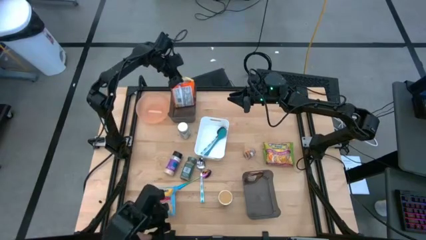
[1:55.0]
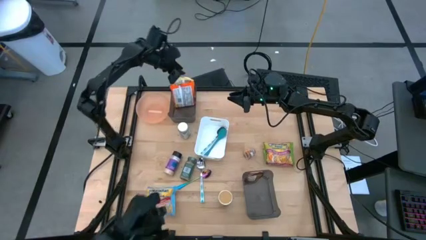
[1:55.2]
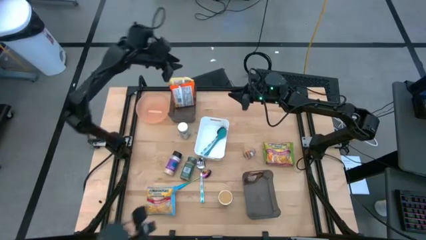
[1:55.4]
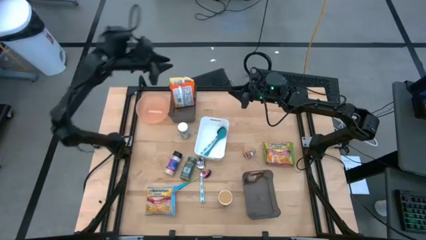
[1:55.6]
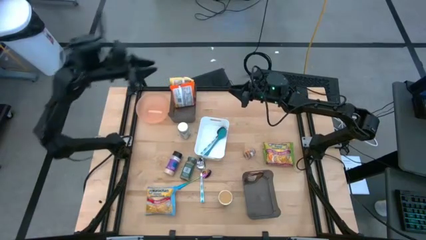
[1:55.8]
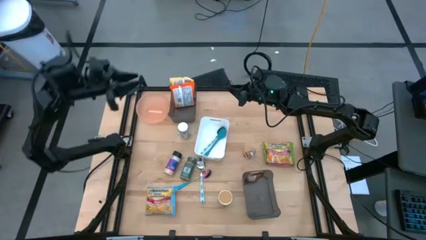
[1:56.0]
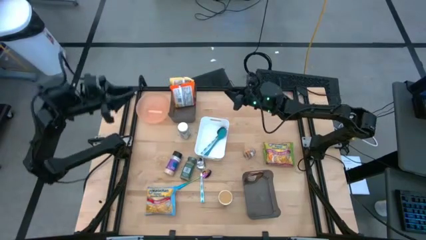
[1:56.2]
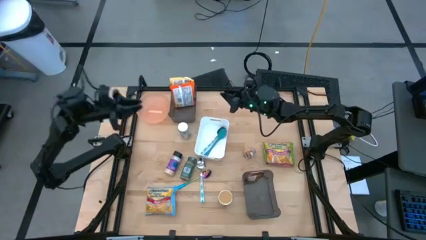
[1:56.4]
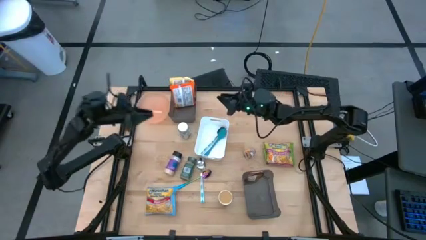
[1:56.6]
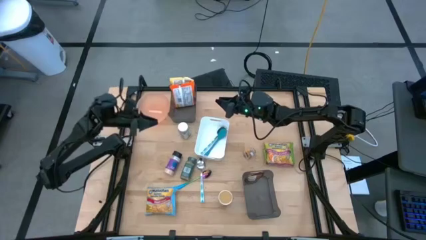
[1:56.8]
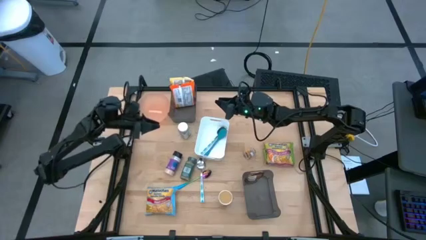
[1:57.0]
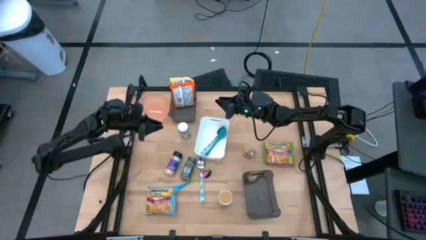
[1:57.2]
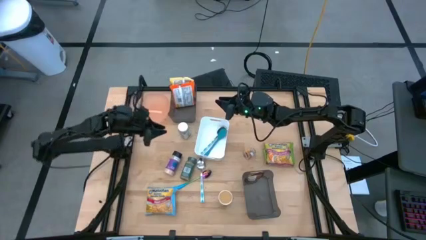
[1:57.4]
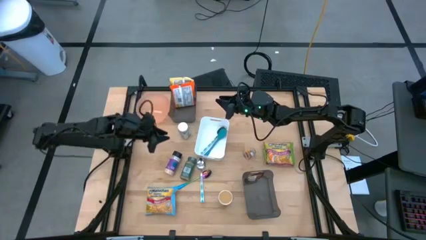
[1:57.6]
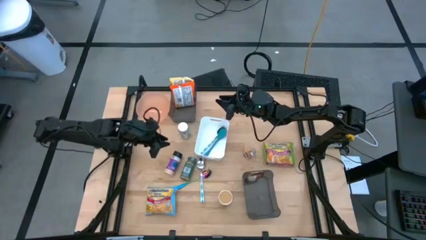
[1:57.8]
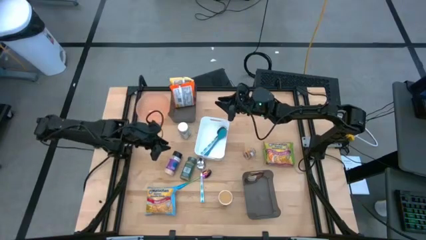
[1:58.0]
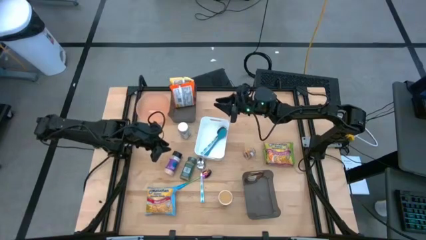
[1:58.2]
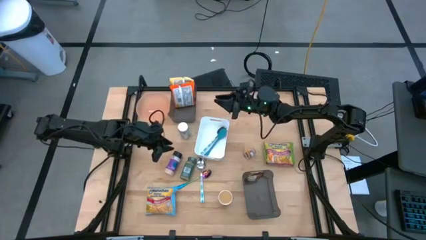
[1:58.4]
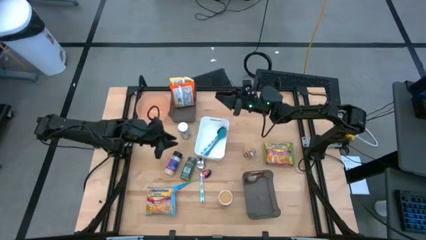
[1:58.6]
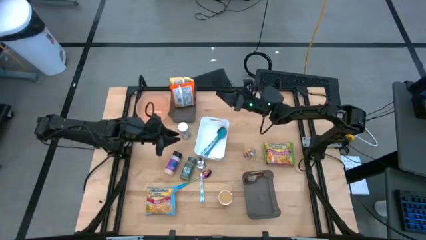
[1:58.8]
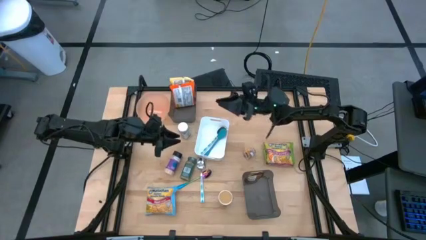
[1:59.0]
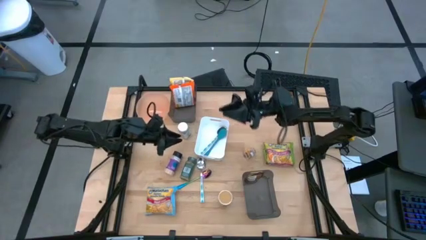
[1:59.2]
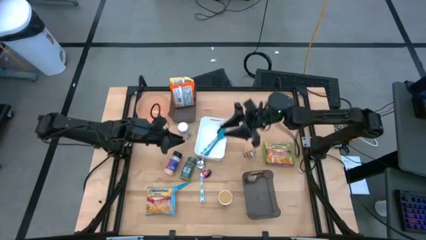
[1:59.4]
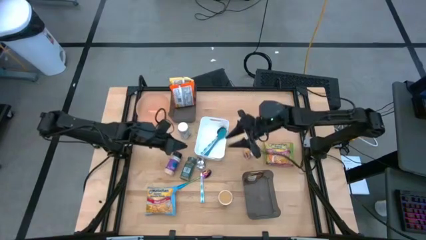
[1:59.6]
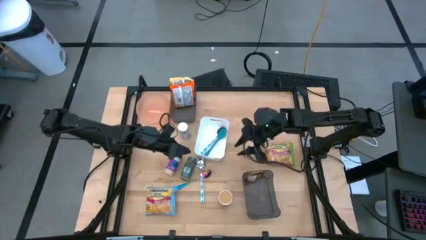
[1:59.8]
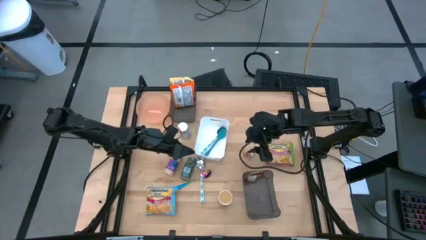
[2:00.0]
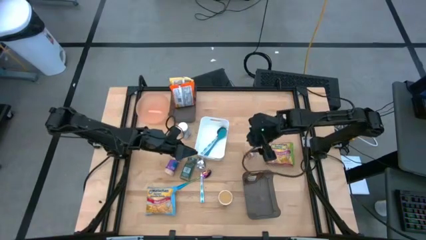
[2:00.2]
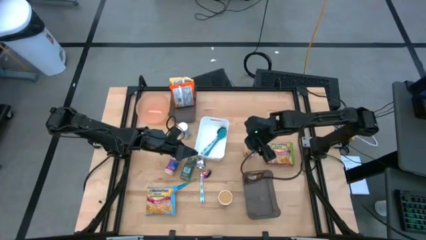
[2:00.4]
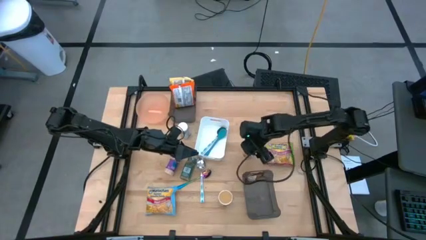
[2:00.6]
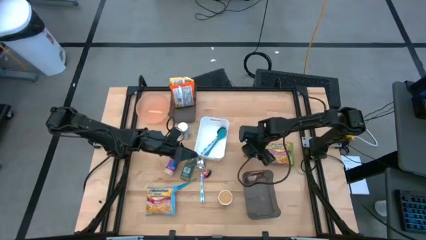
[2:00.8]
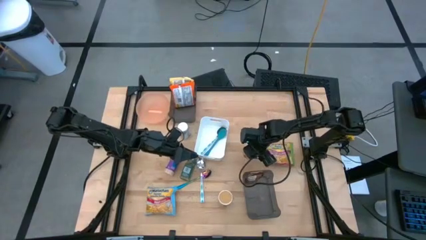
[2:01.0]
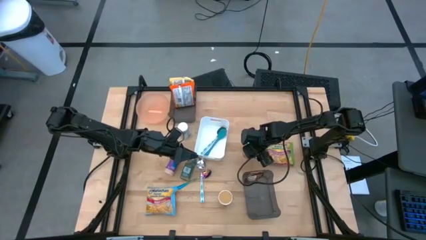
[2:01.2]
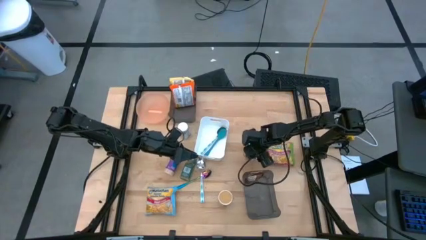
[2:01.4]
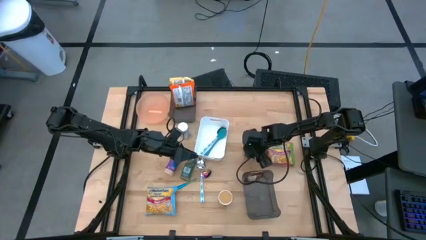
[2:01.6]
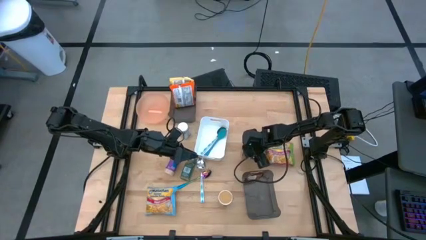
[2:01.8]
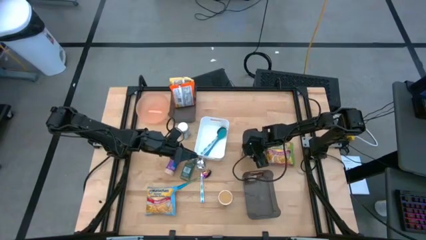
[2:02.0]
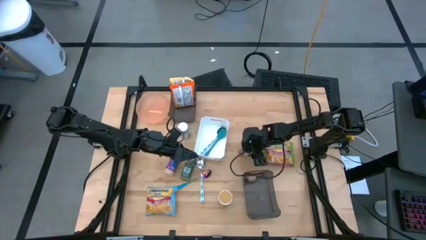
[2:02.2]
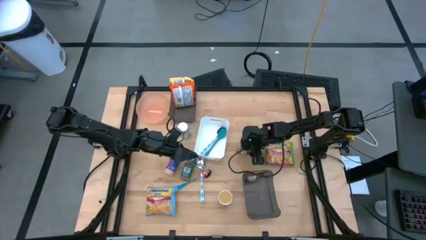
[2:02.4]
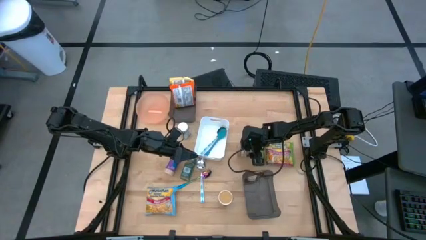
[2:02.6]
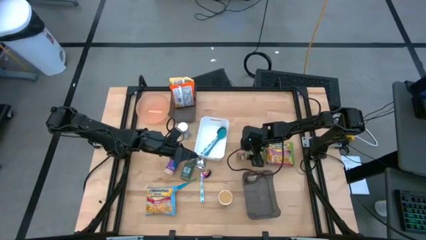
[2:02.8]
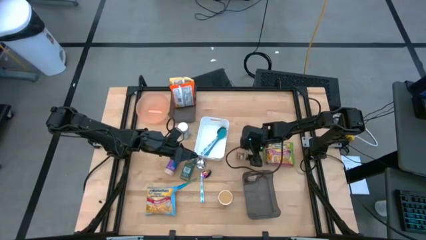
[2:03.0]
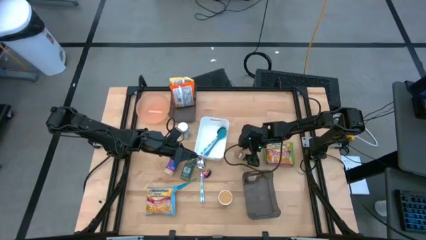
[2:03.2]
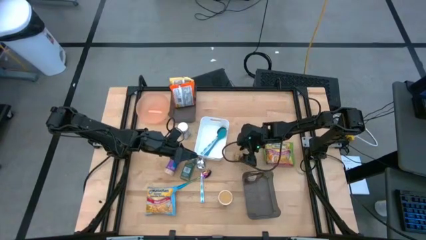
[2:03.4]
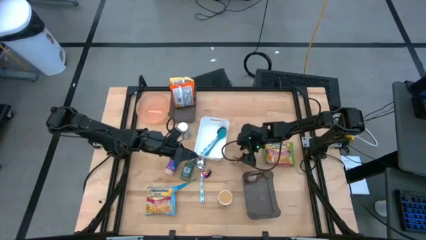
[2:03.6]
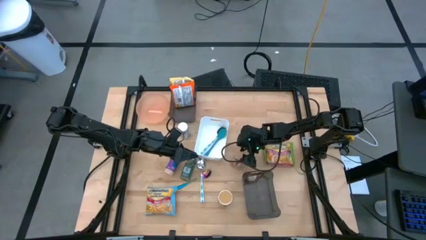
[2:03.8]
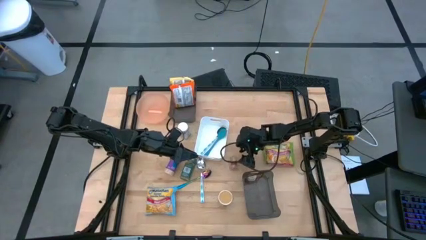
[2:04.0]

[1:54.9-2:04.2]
Task: Pick & Place Food Item
Put the brown seasoning bottle into the bottom black bin

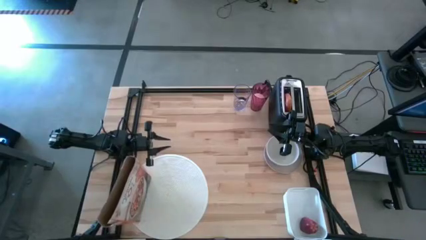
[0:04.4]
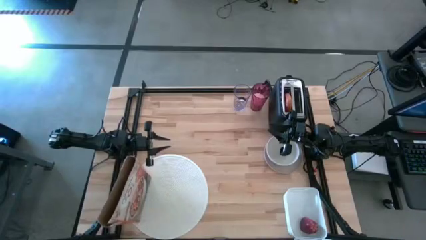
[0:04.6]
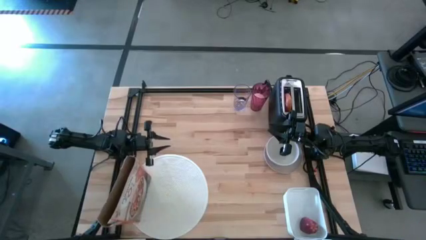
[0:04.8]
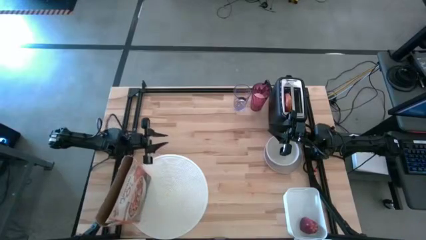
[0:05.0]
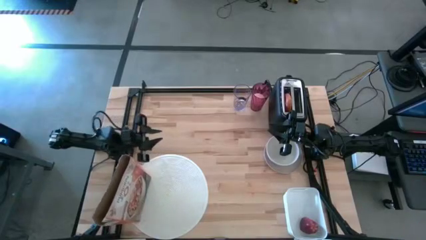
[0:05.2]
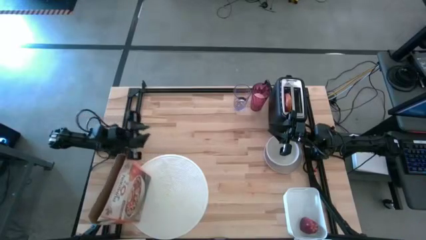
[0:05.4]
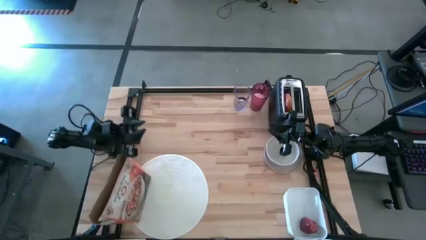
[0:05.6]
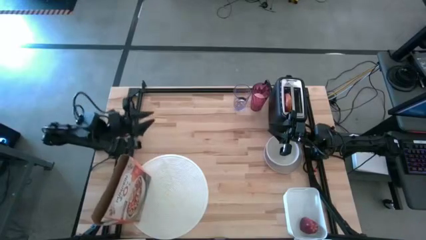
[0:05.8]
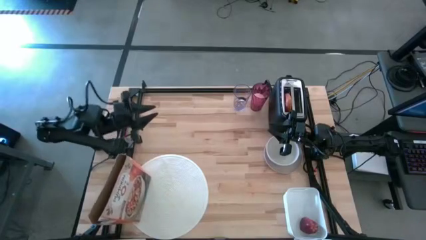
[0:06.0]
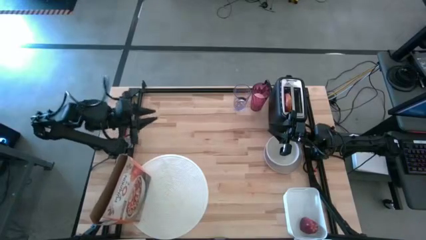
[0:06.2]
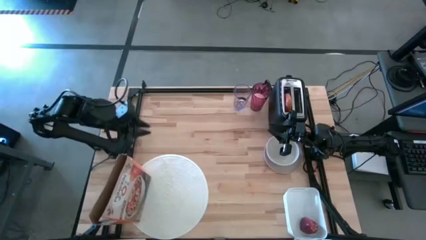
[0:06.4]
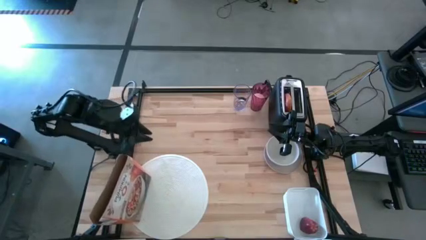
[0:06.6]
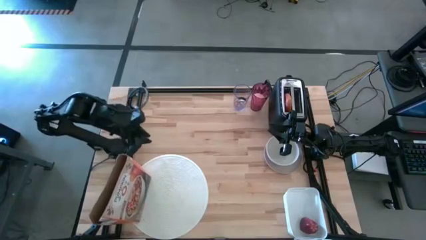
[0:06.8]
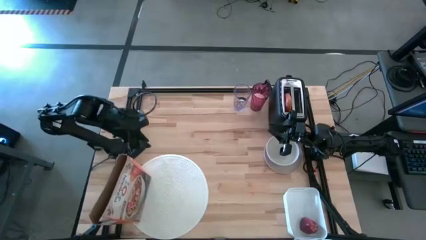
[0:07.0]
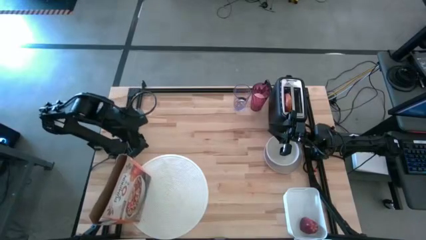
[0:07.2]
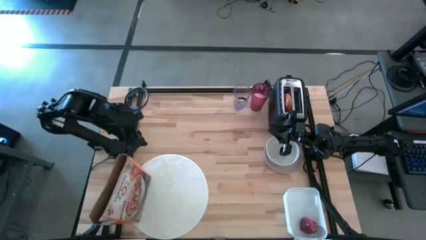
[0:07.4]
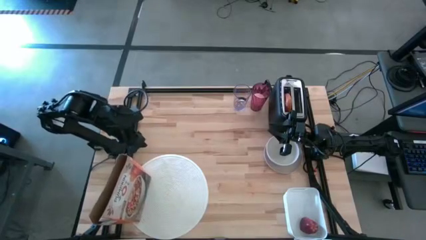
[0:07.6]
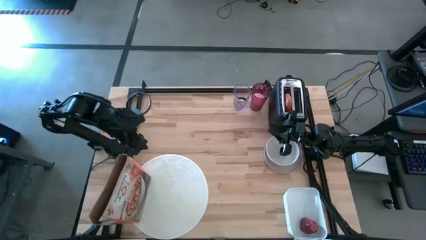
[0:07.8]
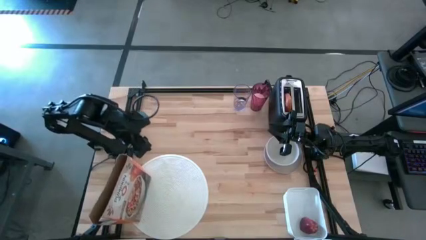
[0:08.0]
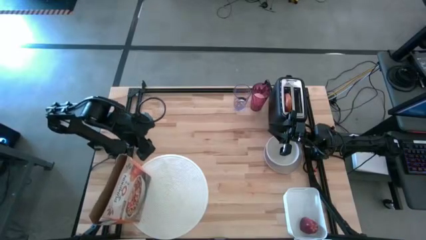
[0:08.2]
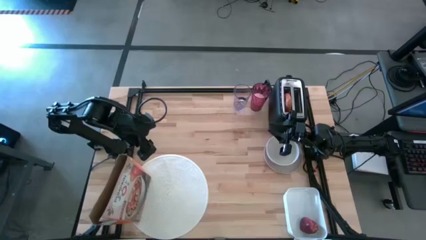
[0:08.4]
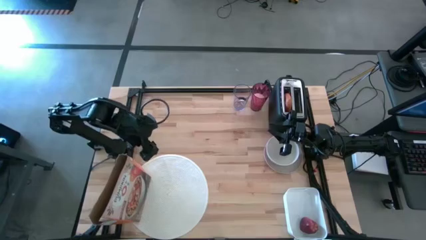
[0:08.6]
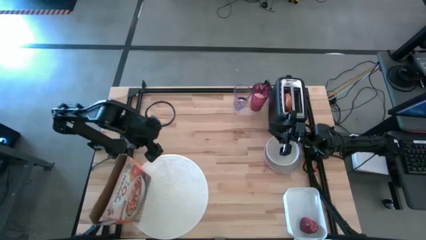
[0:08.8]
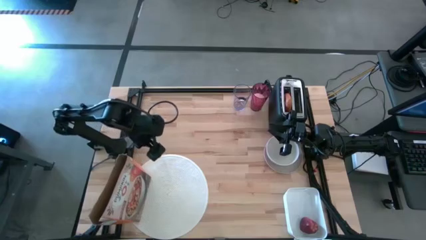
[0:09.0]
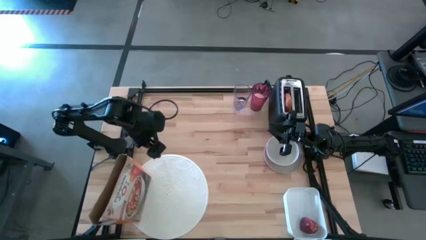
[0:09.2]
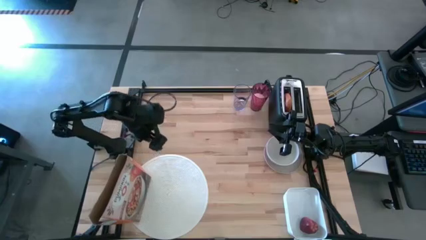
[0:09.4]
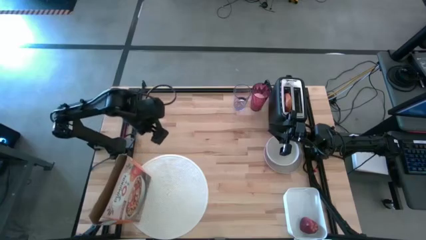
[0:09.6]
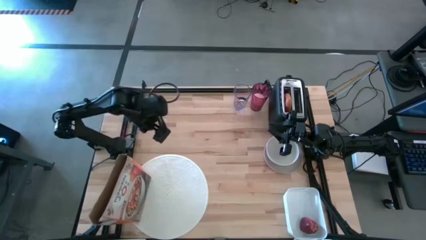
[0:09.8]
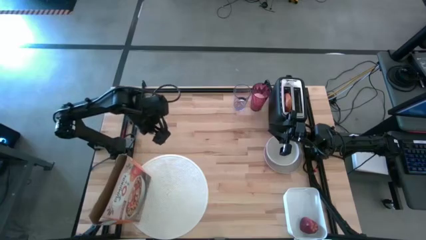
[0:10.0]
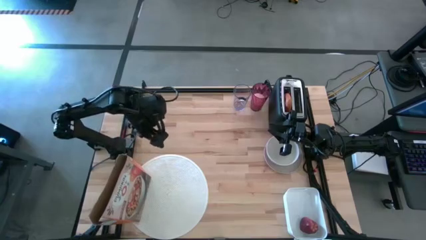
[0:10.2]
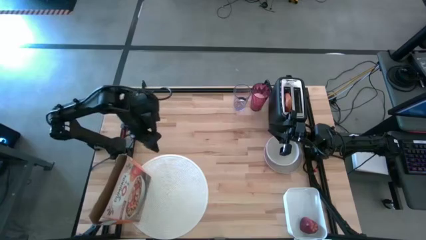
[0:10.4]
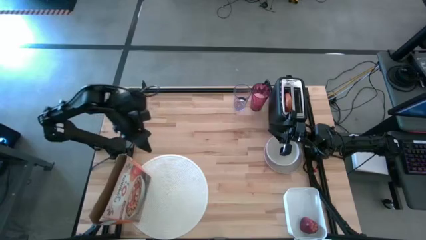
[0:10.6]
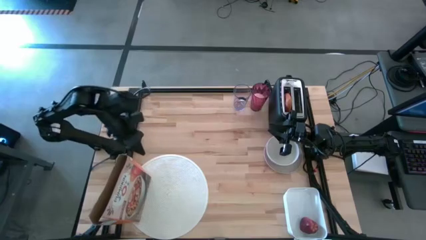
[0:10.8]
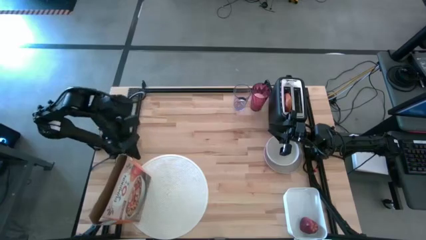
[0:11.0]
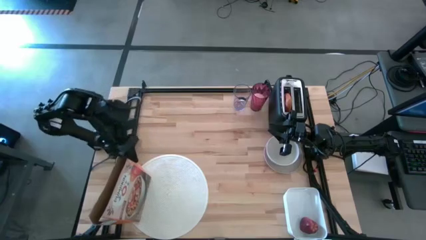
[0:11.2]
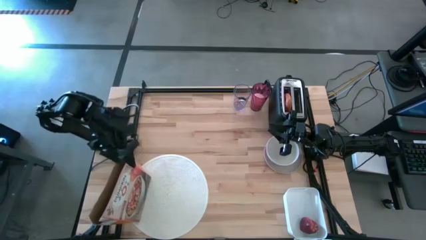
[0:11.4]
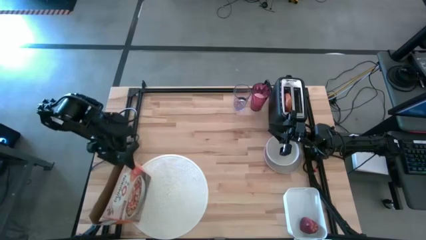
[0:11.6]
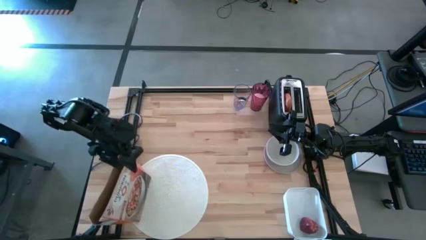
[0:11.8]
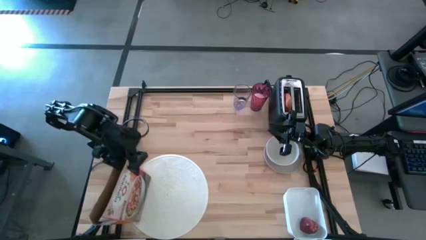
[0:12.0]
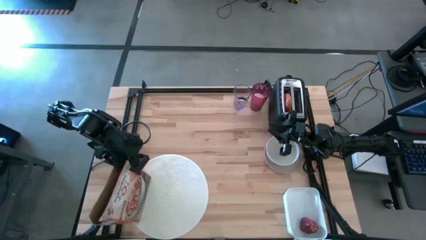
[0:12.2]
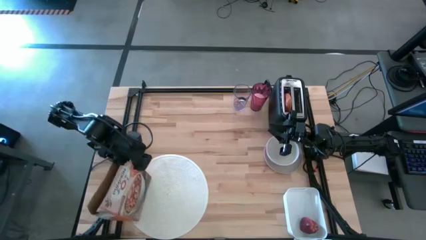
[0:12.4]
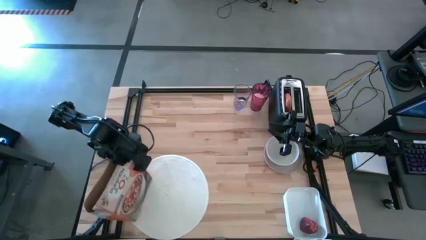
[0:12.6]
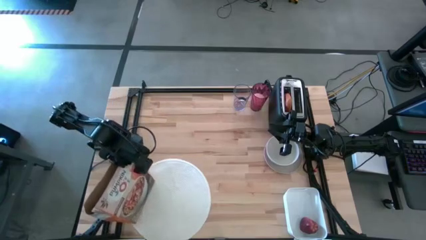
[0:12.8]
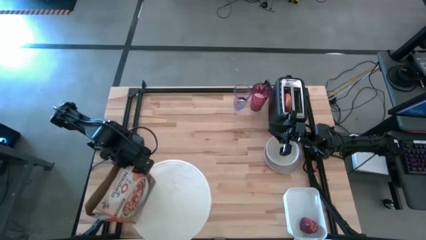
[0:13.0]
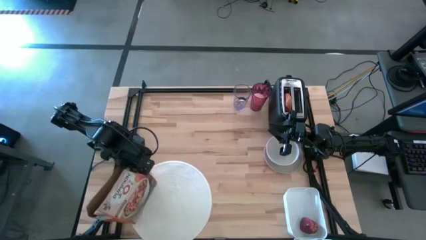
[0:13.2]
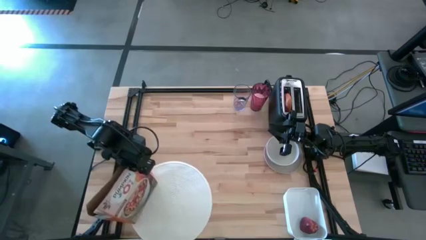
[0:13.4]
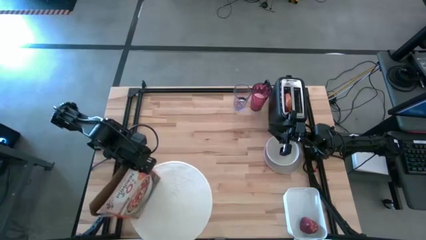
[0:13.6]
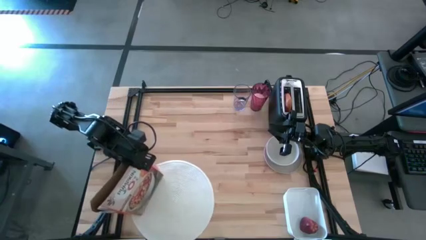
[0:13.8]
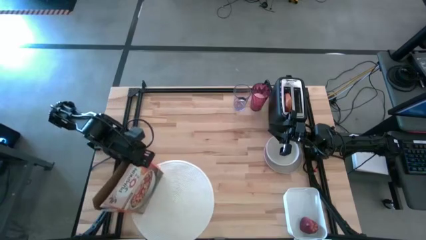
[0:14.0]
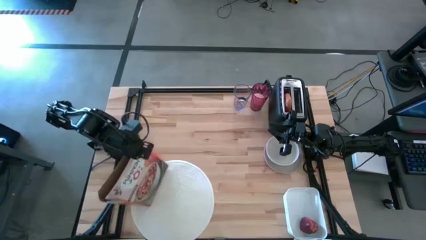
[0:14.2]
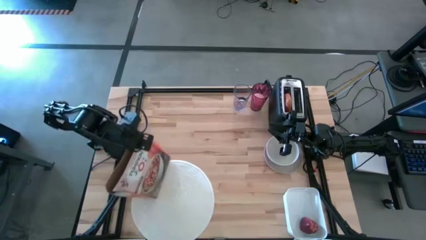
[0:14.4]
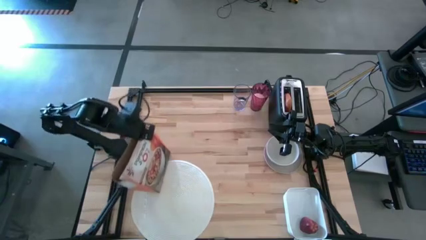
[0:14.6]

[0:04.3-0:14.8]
Task: Arrange a breakfast setting
Move the orange cereal box to the top left of the table
